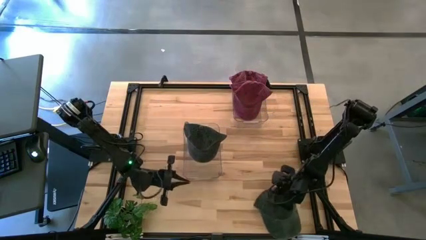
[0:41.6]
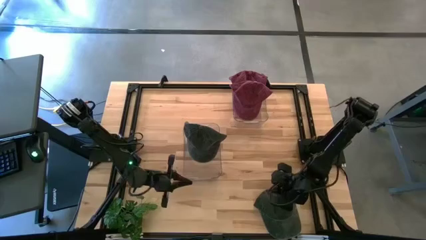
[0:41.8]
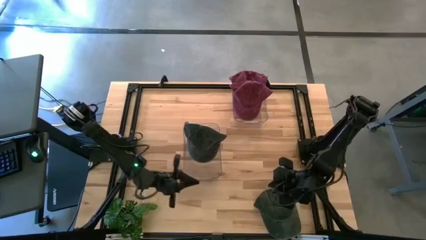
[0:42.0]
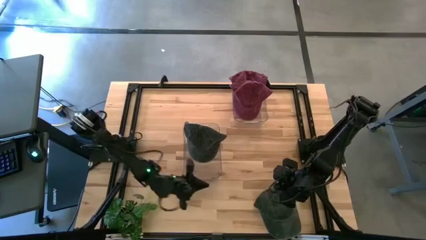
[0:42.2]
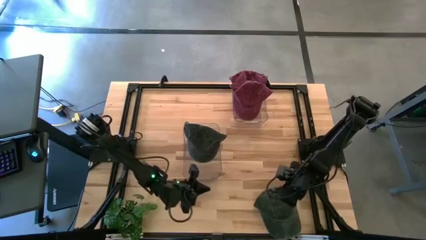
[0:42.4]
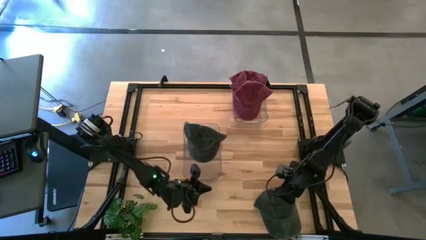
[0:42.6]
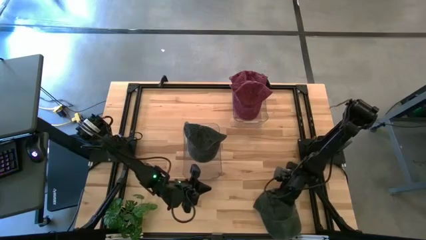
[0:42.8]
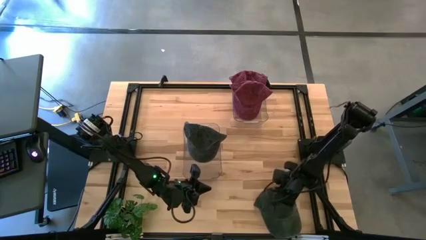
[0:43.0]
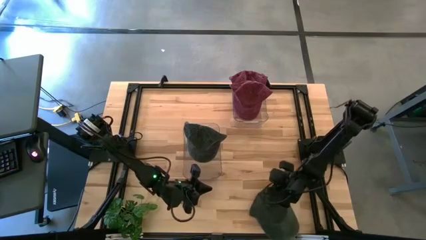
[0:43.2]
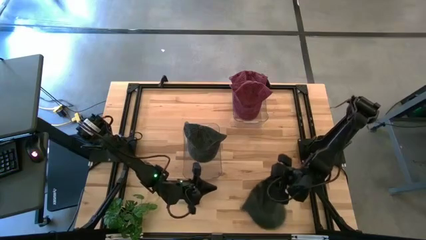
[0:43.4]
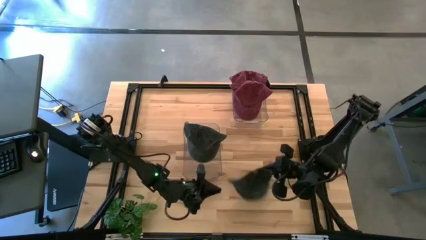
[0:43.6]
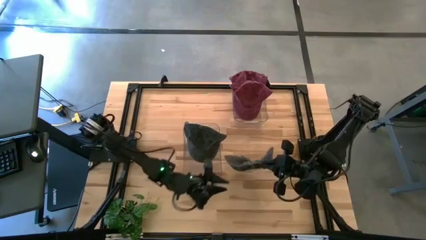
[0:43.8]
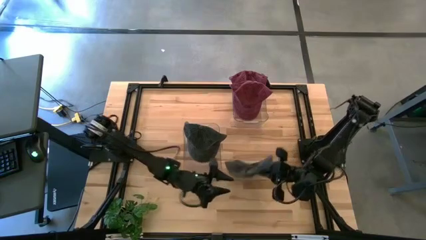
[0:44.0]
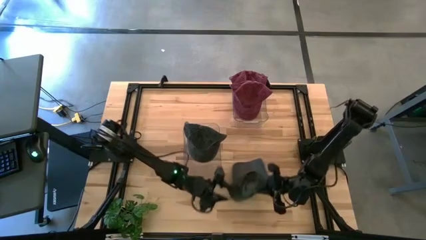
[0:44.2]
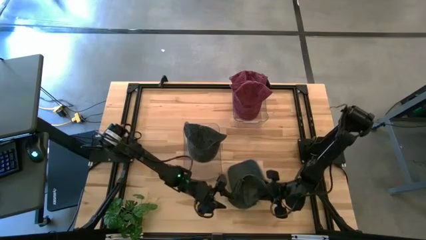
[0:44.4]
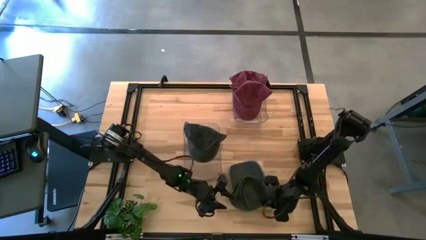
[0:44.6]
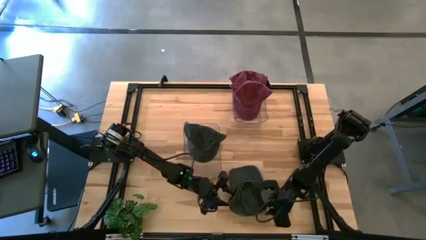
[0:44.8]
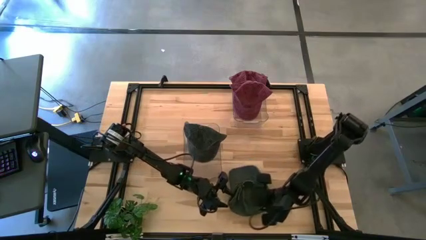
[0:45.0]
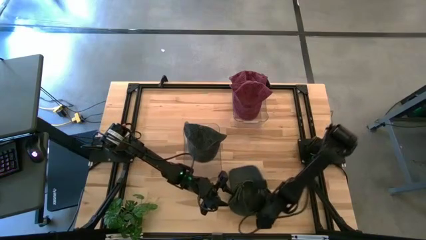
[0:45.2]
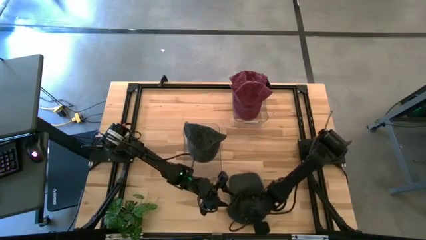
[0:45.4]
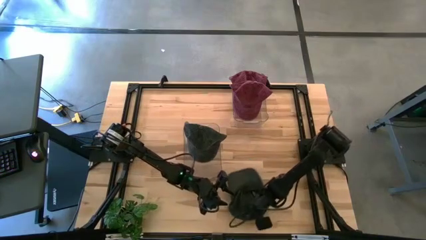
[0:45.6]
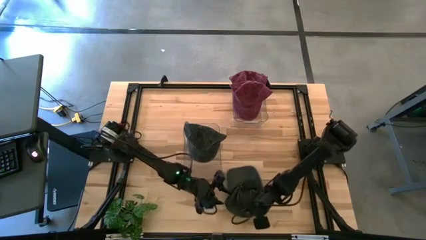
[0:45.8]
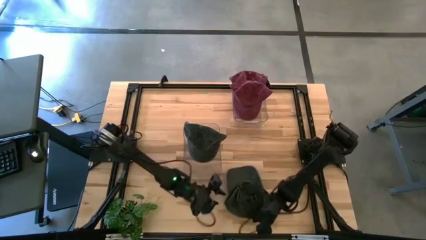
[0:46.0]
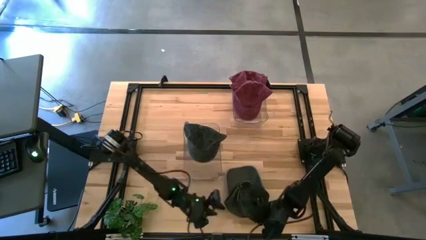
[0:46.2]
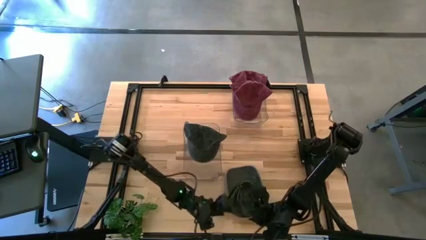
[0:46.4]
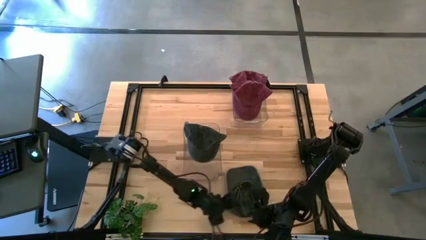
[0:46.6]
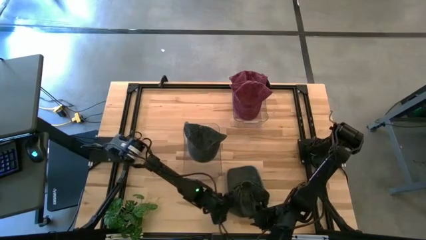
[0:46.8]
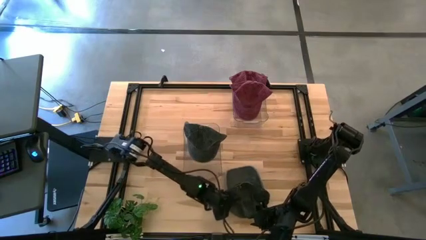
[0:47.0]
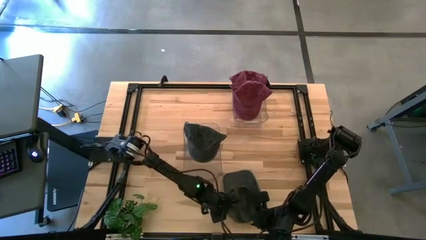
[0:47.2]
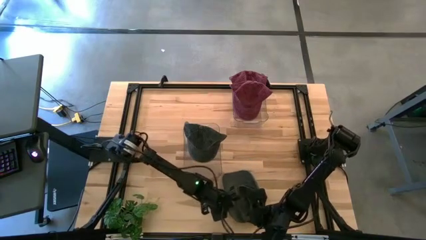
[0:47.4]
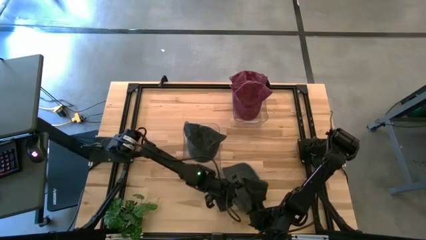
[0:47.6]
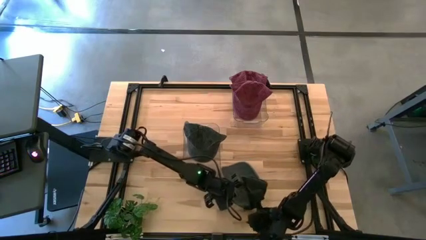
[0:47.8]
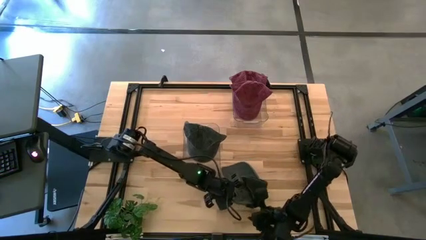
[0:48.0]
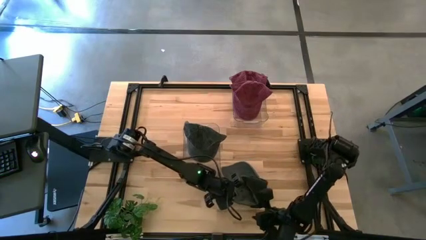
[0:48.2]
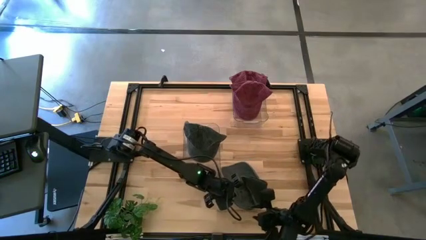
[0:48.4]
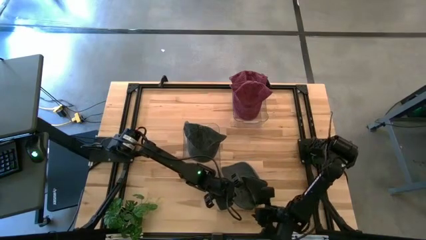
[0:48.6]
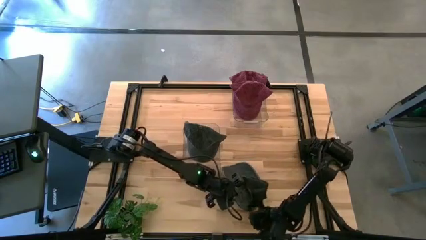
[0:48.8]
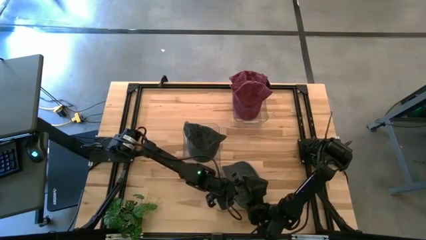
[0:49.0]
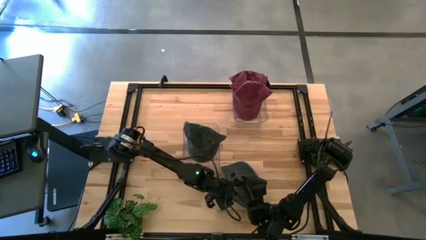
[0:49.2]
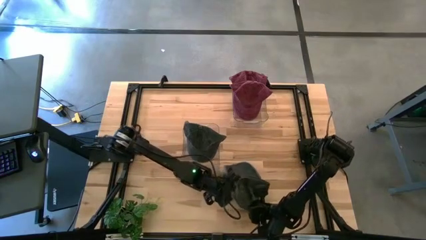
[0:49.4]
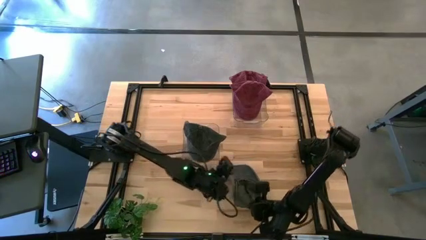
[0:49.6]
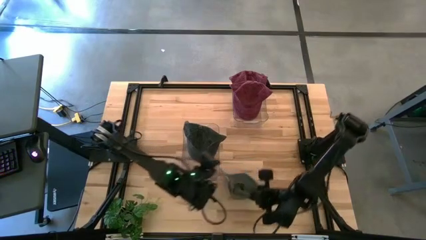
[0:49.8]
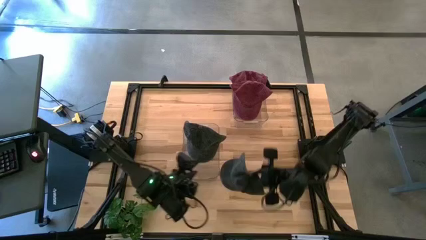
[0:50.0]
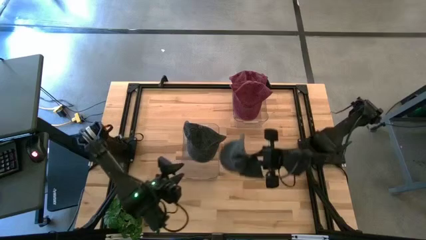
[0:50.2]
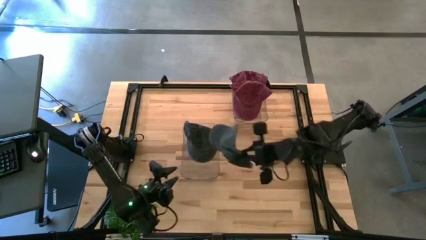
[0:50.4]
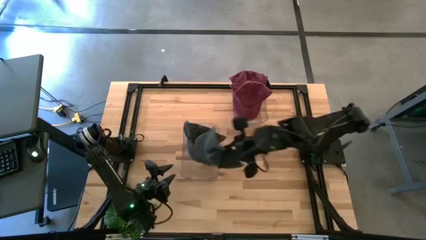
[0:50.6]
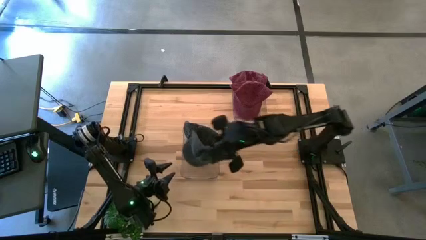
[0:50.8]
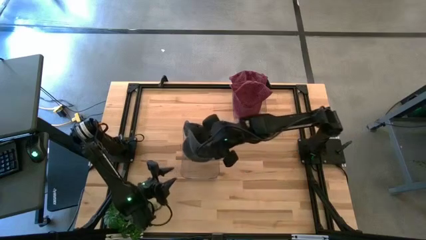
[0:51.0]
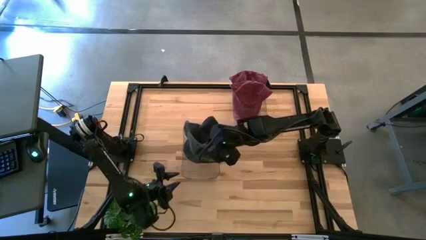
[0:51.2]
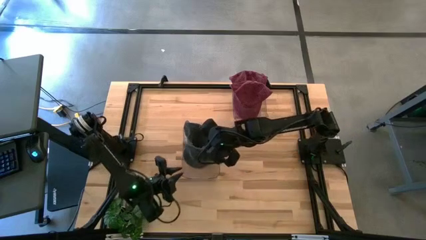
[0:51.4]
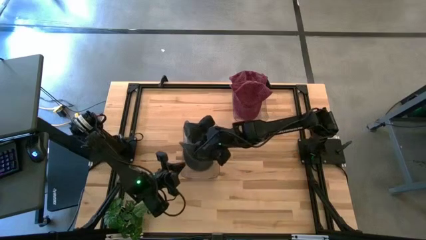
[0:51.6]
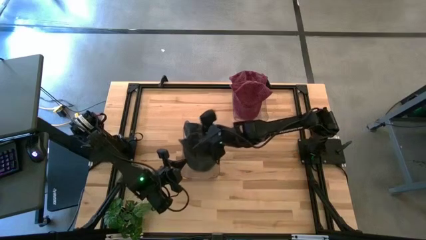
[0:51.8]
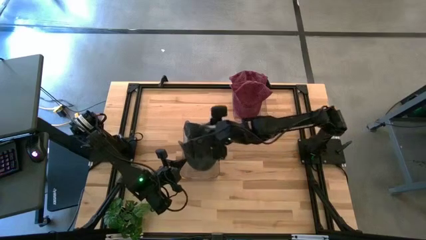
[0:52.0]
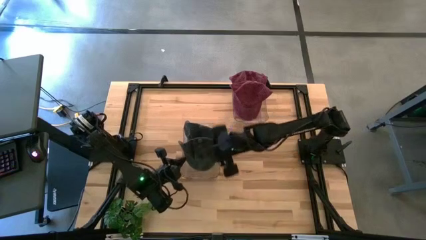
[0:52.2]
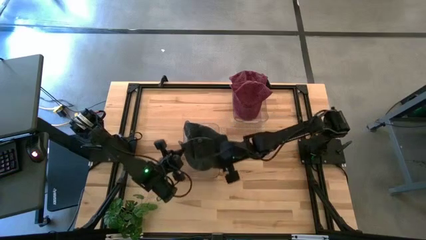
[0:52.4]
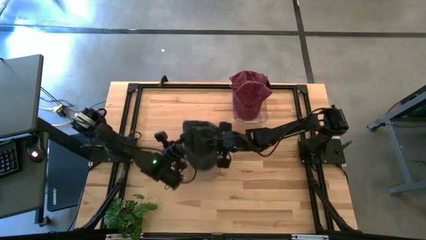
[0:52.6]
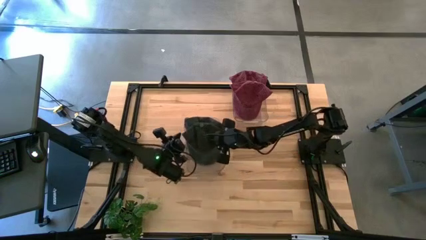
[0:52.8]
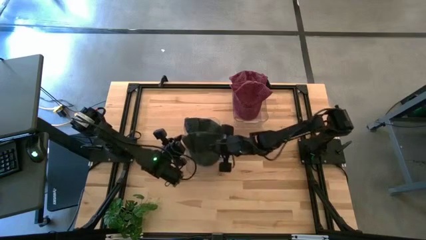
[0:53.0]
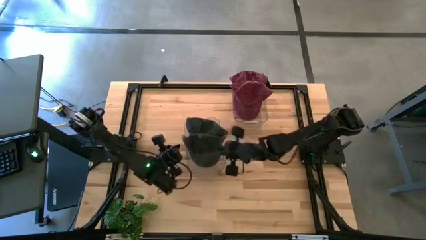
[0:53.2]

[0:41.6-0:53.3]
Task: Pick & Place hat
Put the black cap into the bottom transparent bin

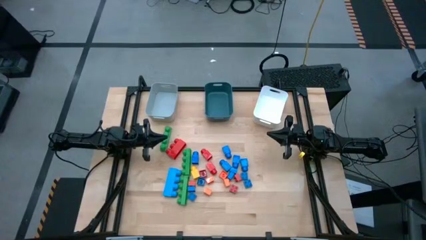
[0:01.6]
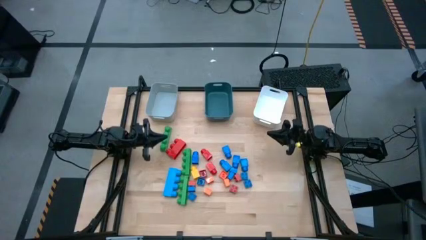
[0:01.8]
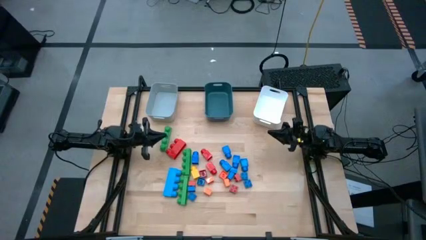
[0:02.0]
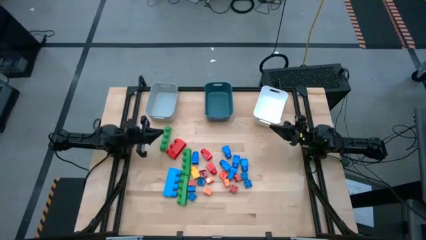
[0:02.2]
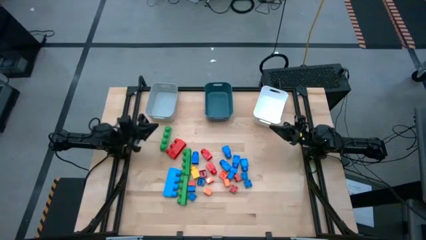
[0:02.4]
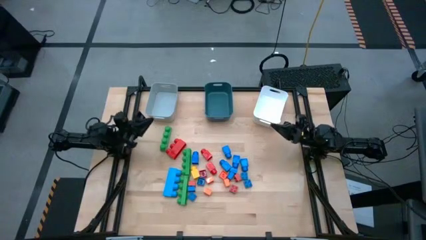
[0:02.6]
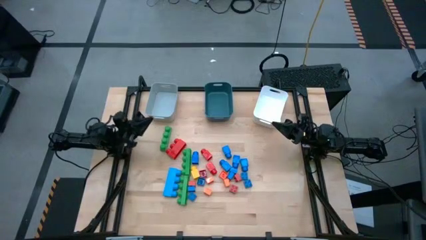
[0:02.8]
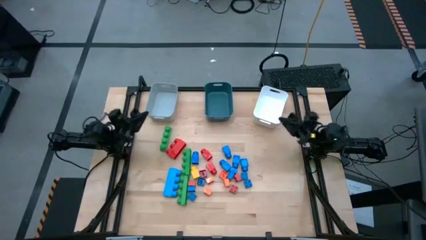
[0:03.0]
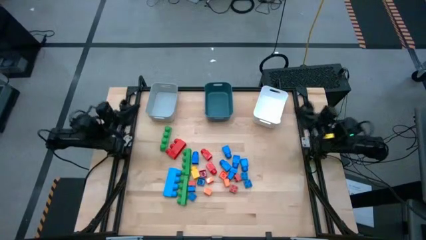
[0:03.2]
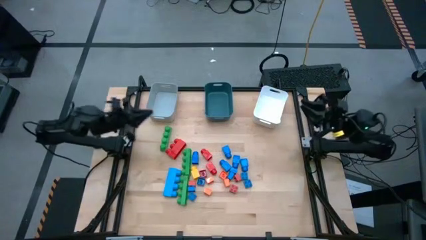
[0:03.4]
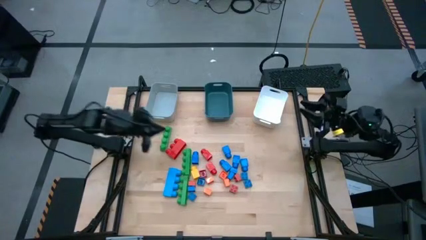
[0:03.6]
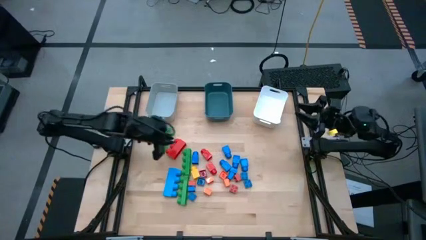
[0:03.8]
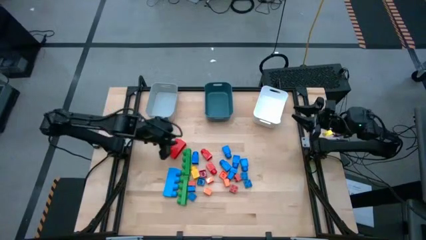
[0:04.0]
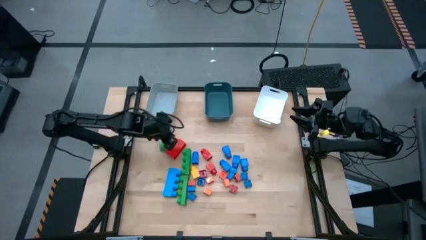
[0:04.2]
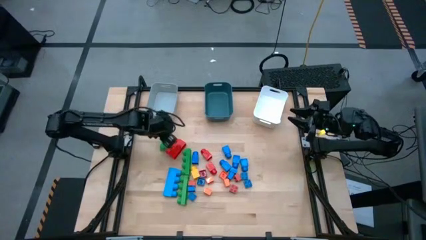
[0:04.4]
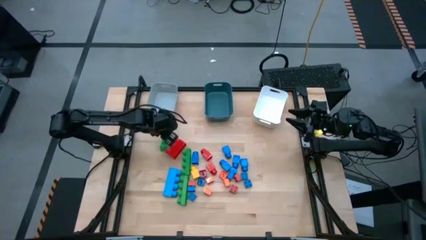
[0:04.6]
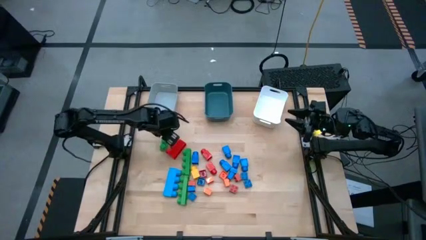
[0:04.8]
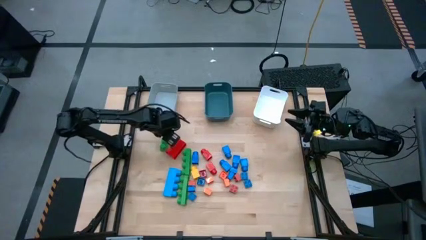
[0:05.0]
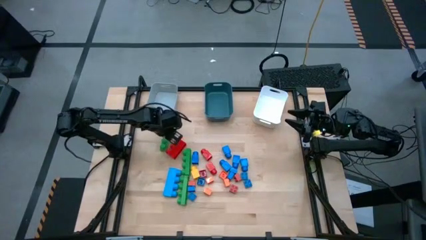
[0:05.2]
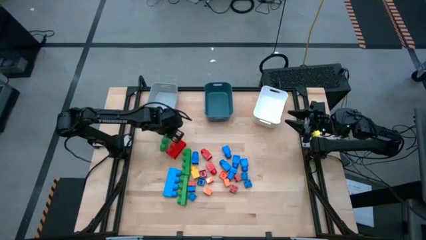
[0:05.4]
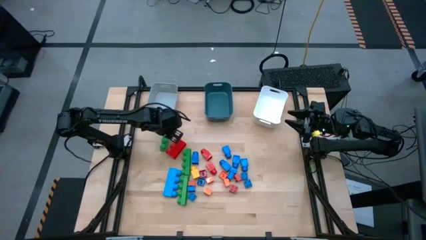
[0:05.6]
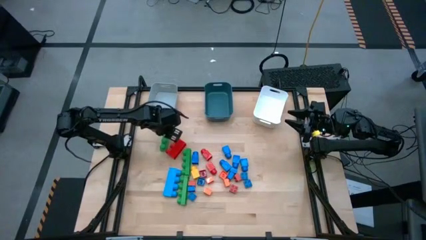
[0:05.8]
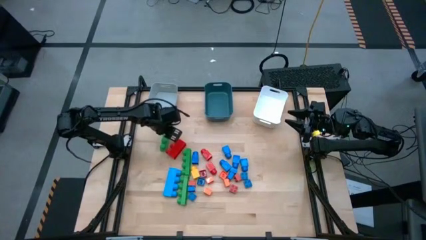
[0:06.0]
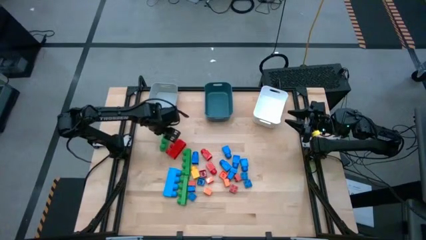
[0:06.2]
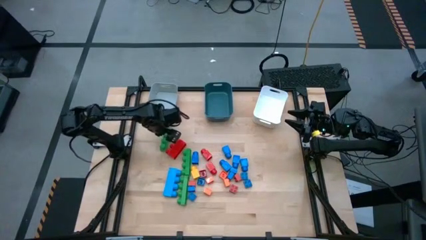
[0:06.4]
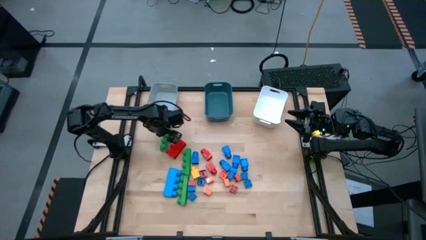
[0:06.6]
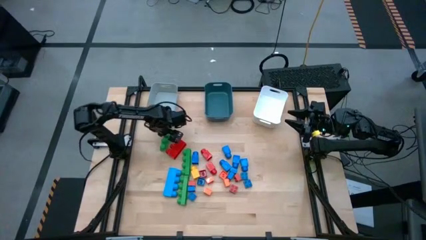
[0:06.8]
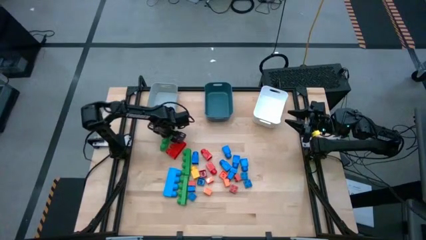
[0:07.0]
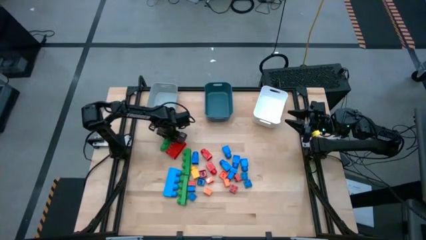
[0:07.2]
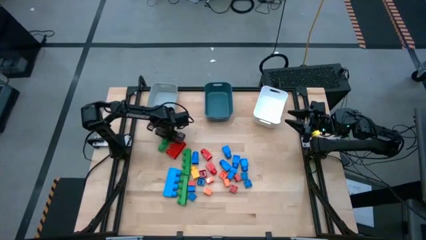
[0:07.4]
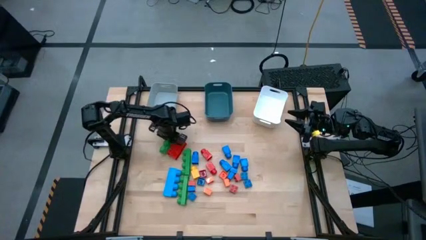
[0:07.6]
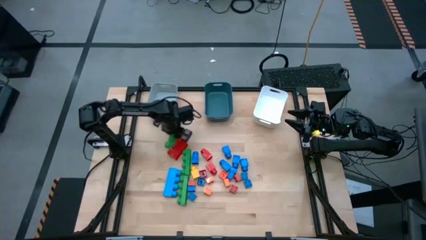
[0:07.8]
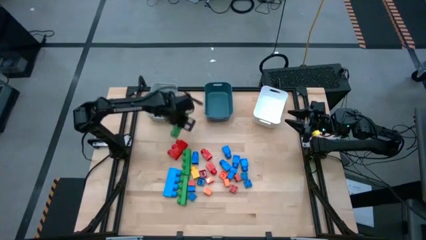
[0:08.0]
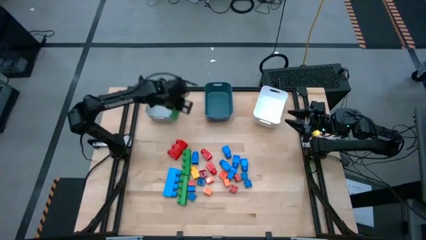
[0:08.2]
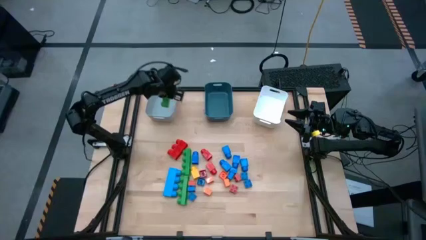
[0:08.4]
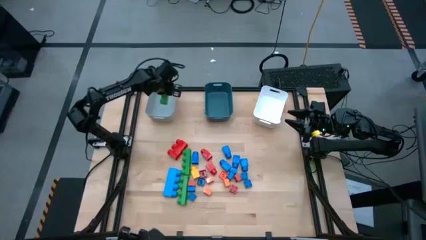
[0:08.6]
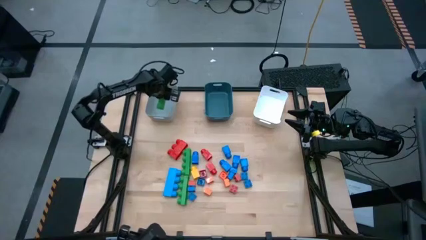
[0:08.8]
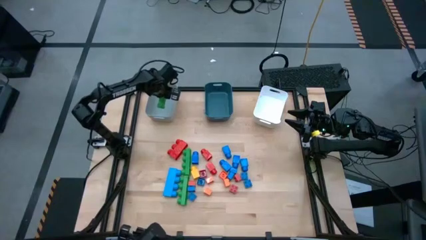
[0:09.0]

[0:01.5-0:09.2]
Task: Sort blocks by size
Put the large green 4 stud game piece into the gray bin
